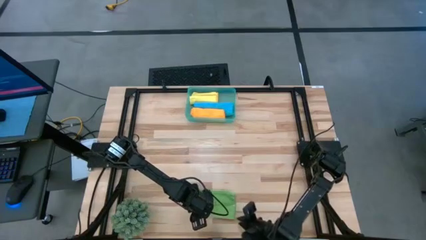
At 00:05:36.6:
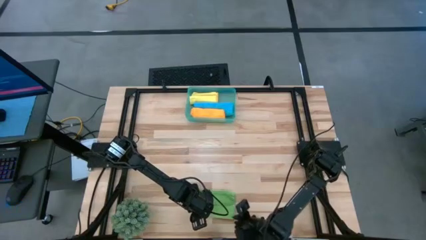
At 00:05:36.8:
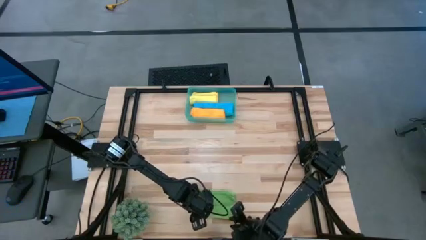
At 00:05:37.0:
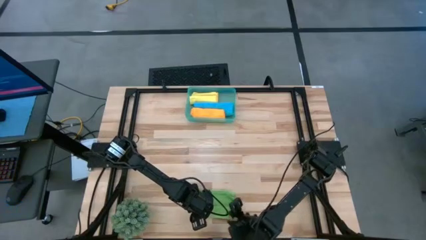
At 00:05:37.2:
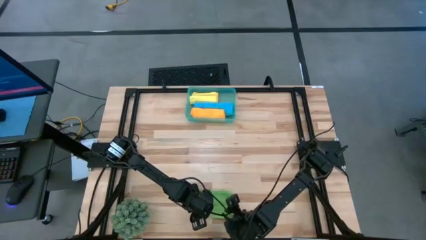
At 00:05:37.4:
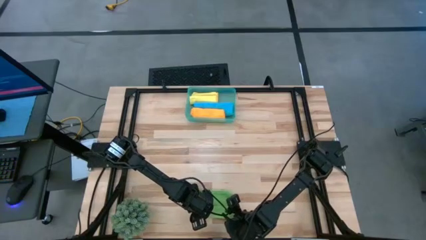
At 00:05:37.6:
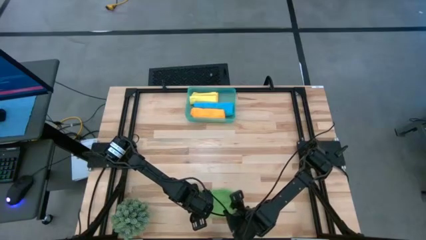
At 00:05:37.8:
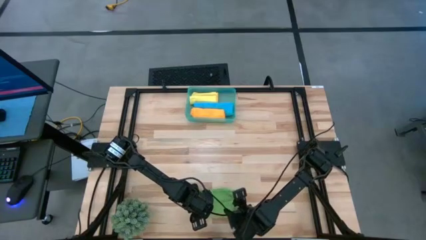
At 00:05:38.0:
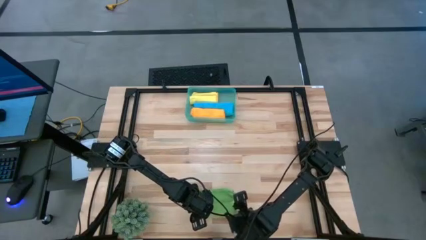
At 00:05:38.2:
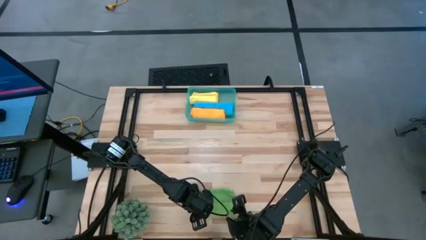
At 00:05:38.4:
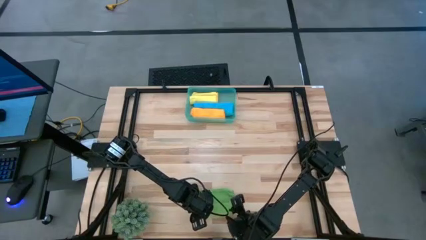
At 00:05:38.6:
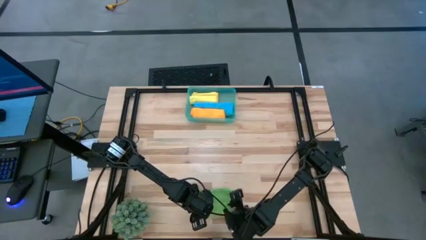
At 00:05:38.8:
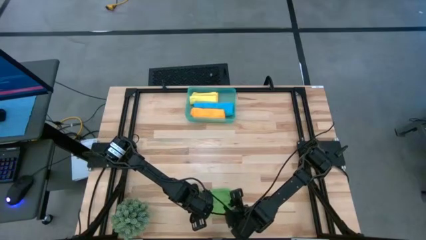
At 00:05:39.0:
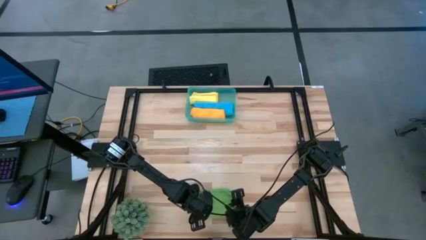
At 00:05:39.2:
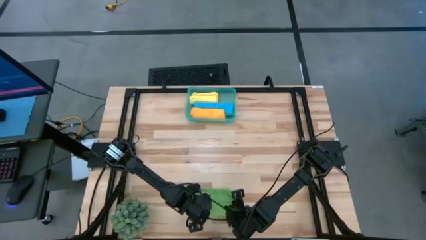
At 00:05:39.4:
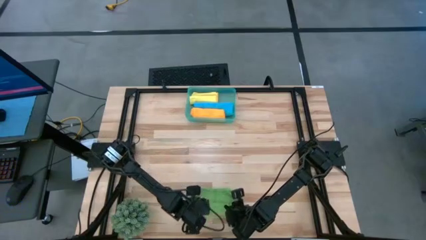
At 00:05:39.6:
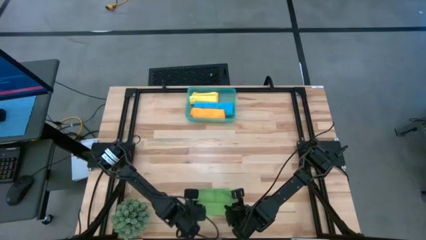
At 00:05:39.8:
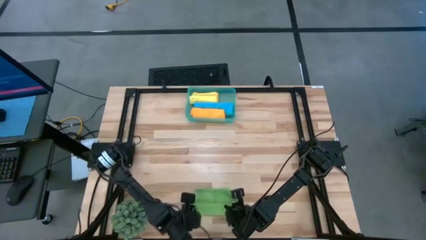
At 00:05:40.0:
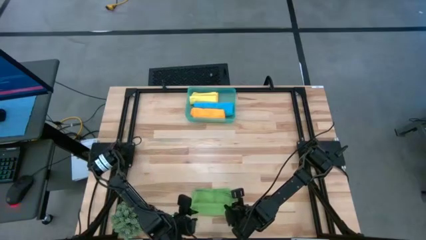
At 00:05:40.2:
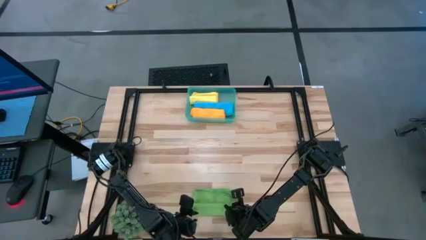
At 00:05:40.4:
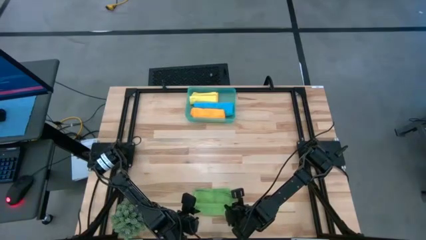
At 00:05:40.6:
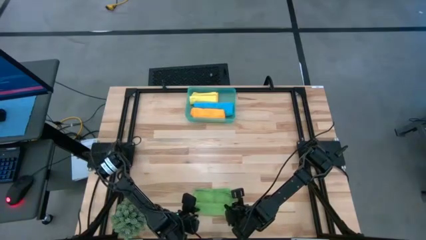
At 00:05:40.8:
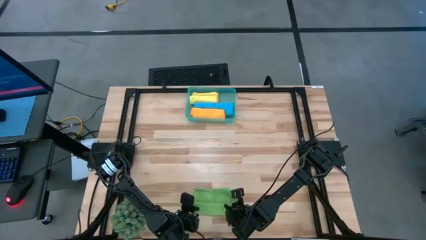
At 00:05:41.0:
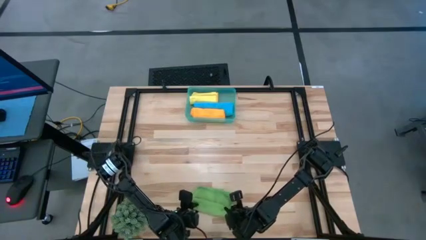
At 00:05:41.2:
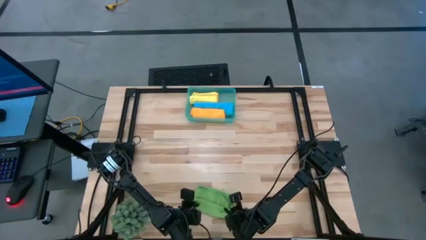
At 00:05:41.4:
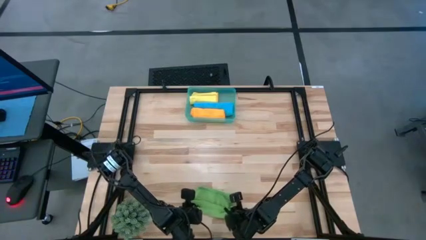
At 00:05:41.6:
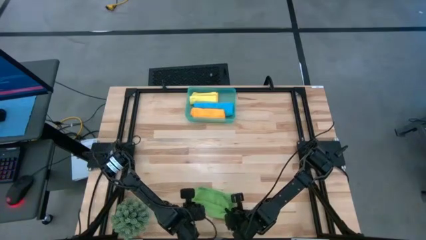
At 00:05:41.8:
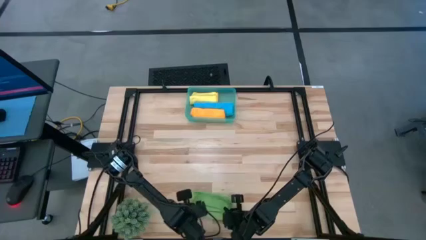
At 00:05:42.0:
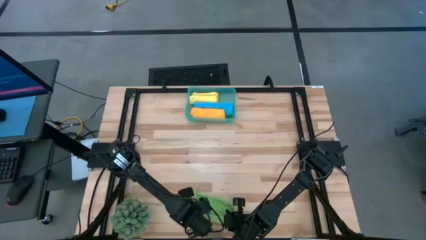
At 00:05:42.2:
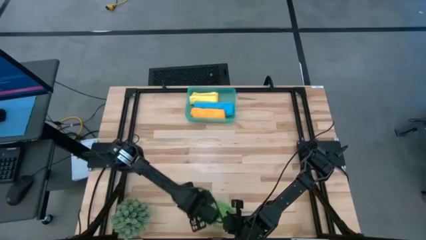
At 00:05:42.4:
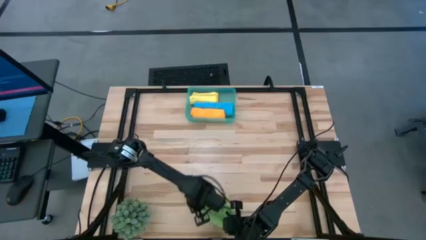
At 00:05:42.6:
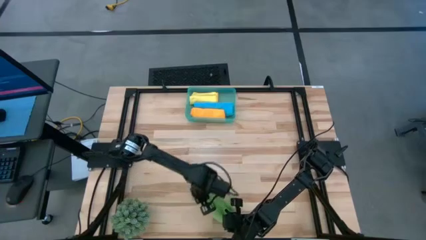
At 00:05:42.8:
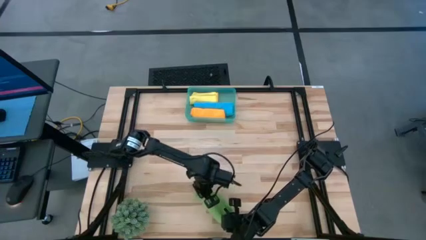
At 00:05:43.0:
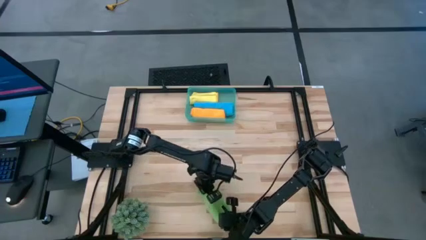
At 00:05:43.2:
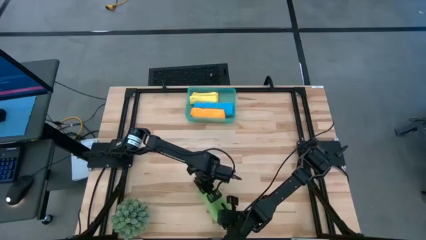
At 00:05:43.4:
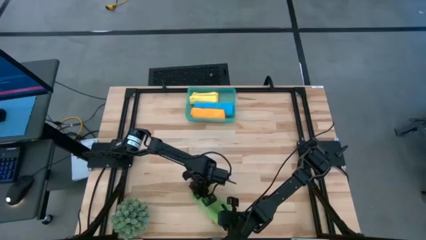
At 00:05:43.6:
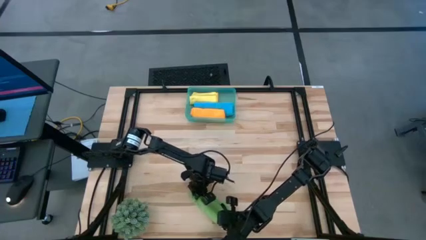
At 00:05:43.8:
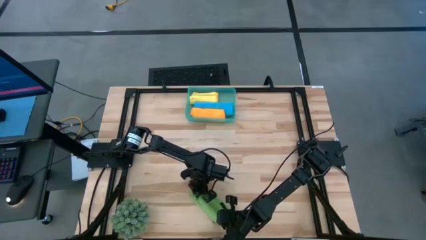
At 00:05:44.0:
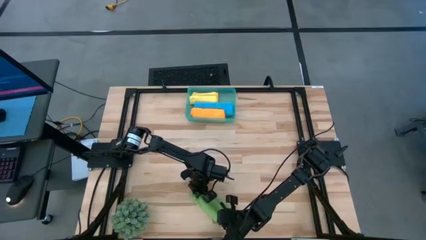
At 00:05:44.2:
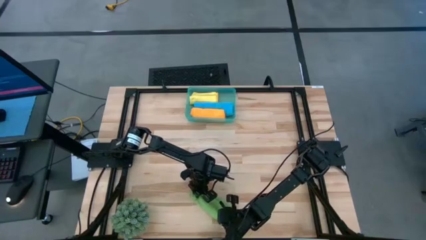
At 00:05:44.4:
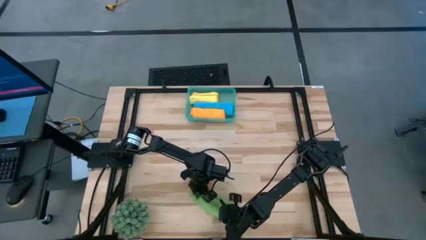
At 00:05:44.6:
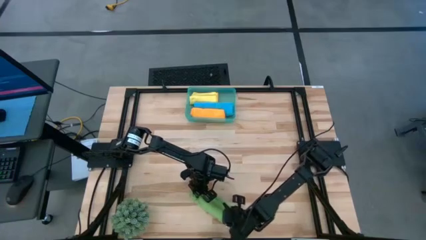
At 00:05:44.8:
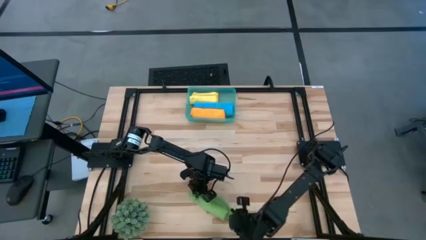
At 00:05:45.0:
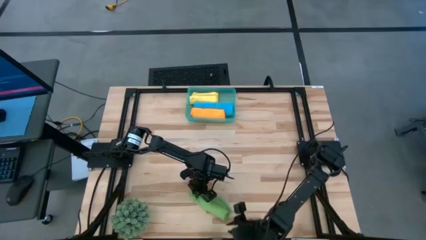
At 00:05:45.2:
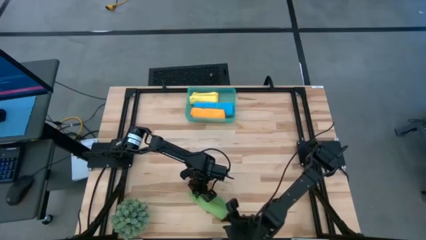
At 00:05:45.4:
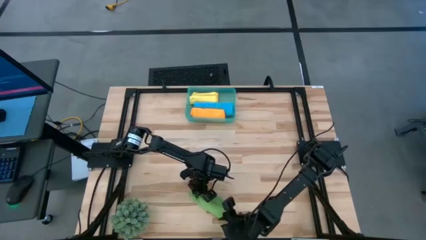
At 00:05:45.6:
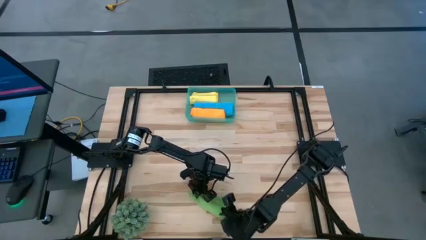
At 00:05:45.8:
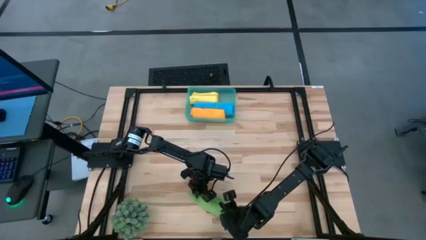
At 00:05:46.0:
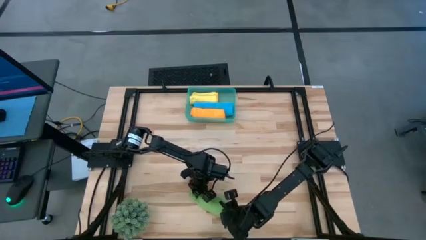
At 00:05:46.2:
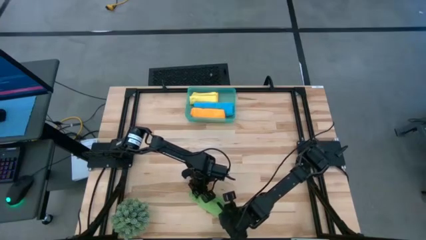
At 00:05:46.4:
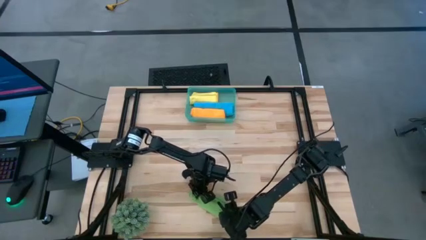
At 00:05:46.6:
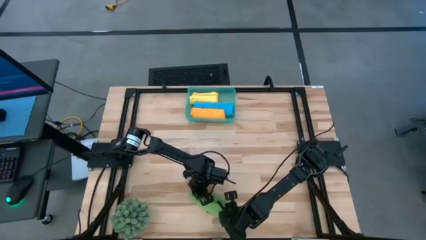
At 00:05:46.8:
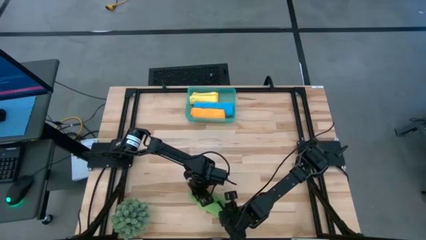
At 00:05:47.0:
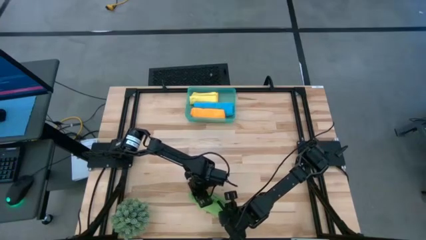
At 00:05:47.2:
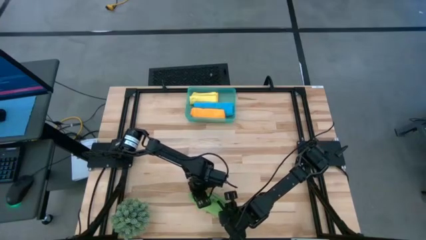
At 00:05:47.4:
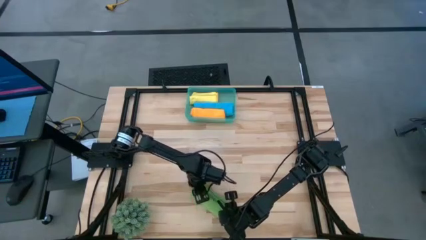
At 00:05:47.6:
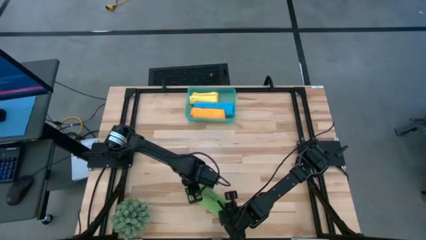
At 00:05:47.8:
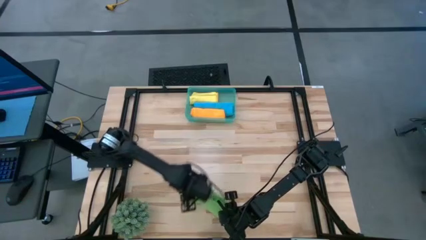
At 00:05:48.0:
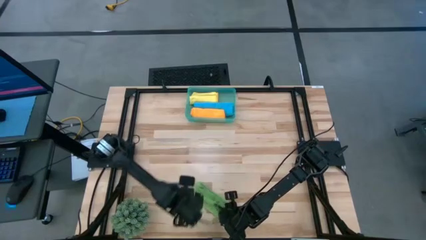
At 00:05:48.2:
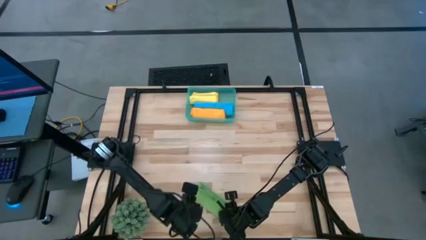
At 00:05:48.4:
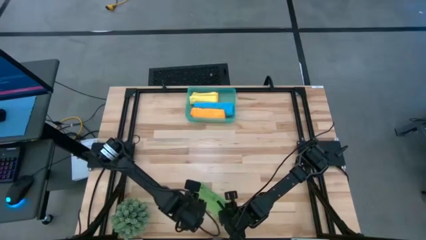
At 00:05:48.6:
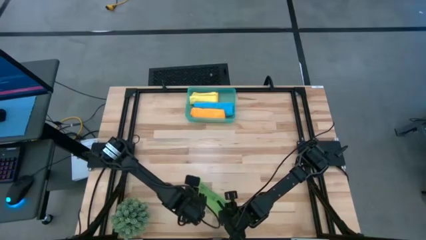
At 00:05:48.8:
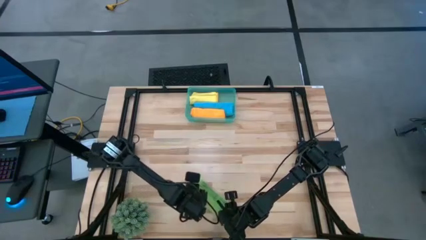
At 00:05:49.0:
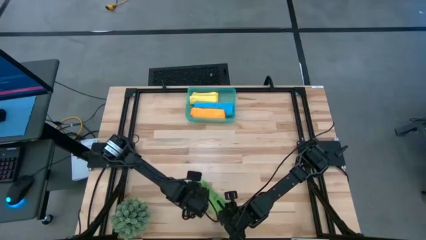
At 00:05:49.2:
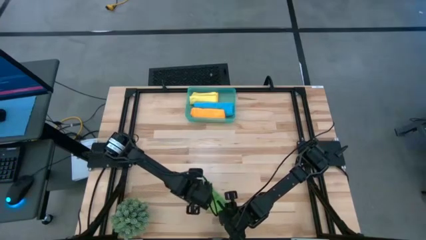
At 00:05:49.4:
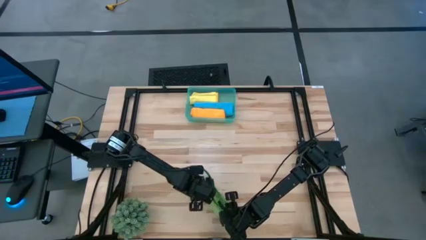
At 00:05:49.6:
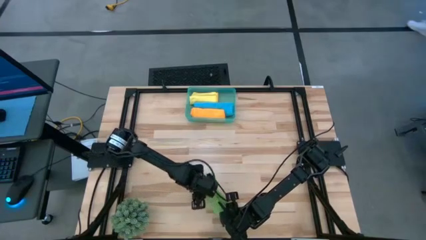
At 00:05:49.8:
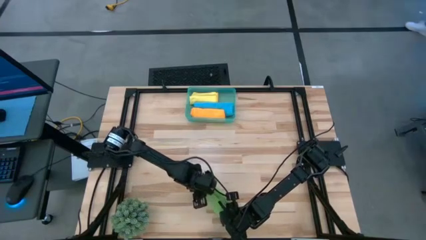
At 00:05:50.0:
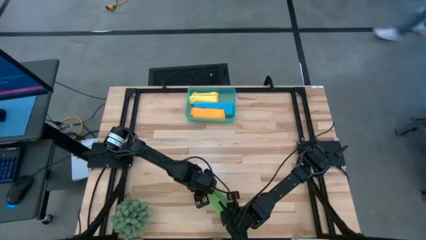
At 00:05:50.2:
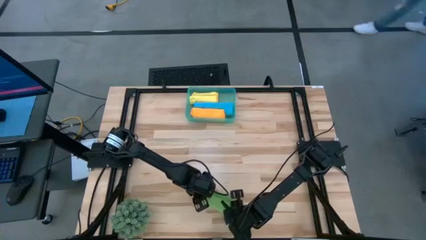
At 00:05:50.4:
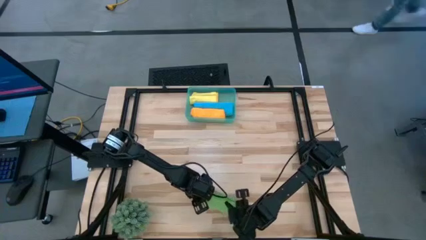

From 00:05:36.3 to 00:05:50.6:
Task: Roll microfiber towels into tight, uniform cylinder then place into a basket
Roll the green microfiber towel
